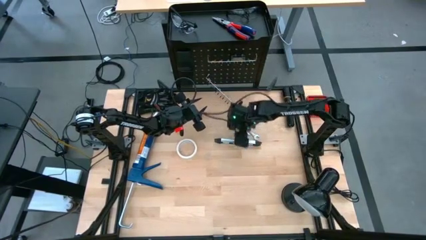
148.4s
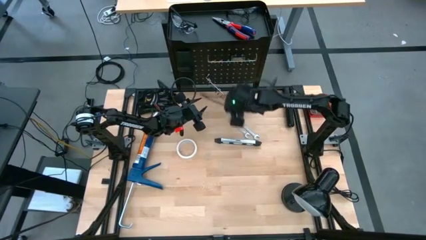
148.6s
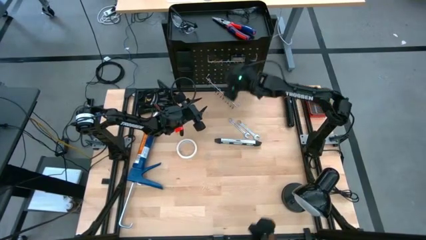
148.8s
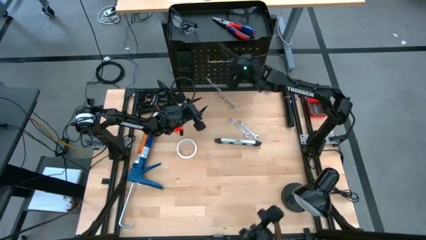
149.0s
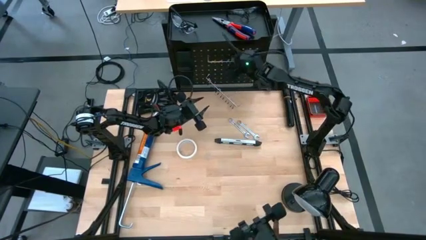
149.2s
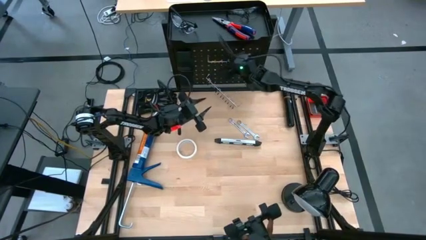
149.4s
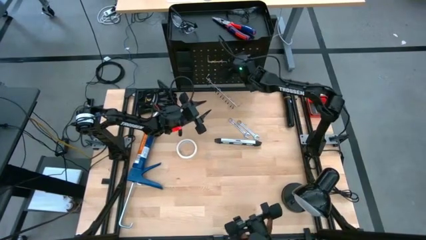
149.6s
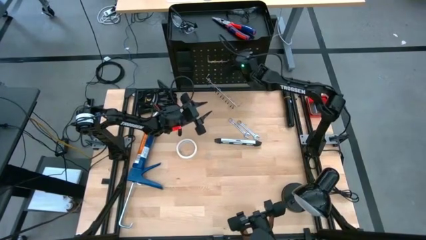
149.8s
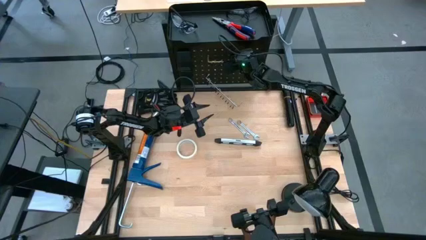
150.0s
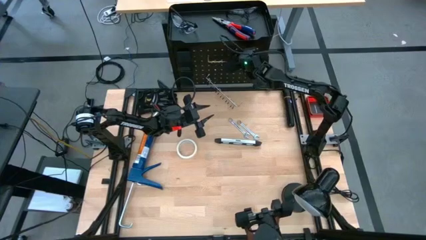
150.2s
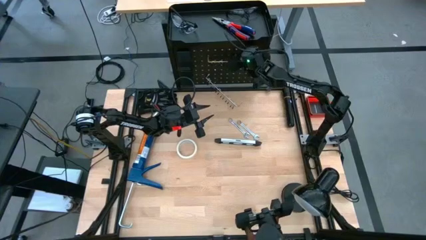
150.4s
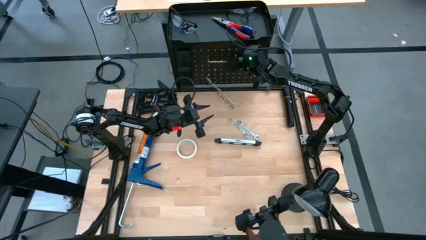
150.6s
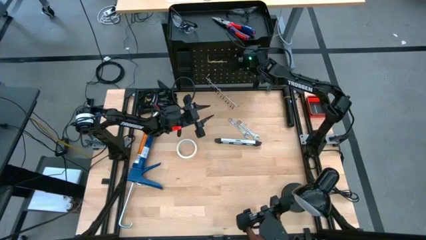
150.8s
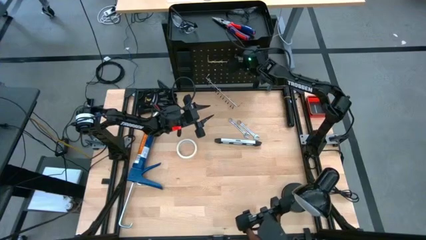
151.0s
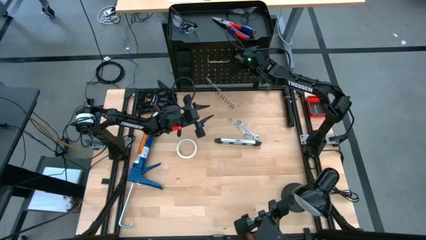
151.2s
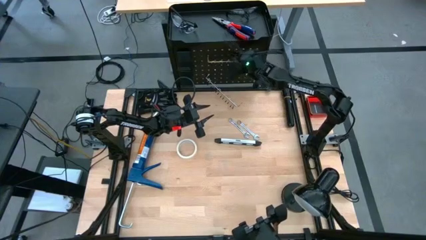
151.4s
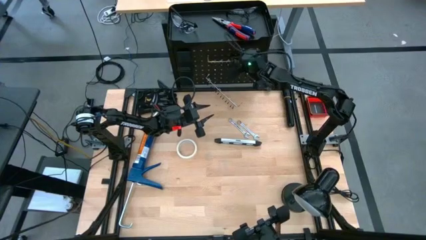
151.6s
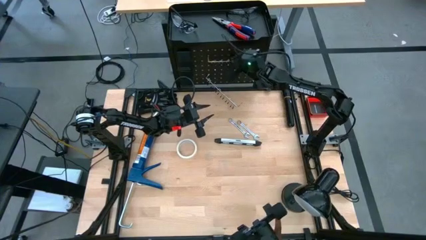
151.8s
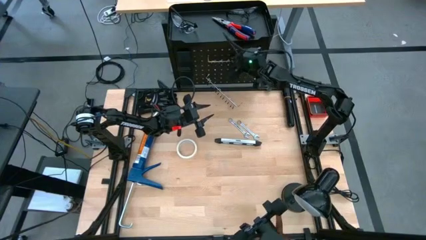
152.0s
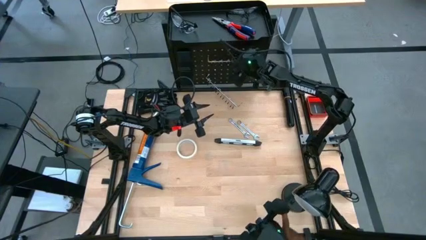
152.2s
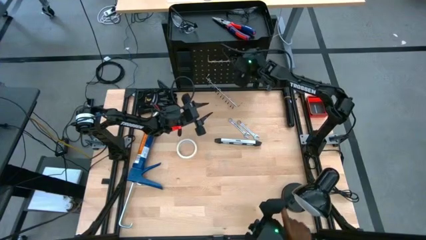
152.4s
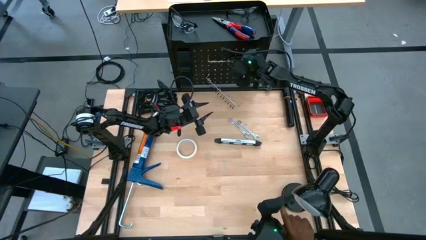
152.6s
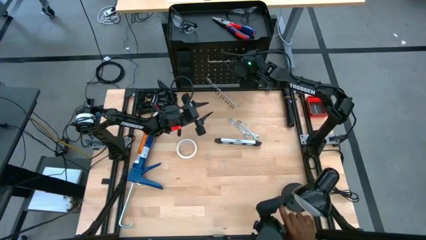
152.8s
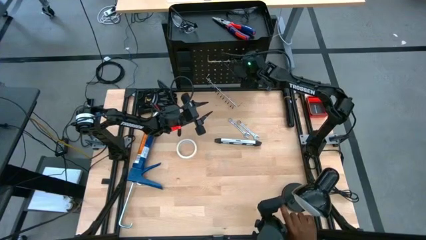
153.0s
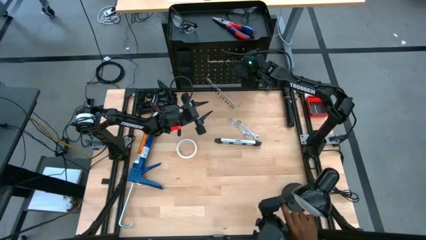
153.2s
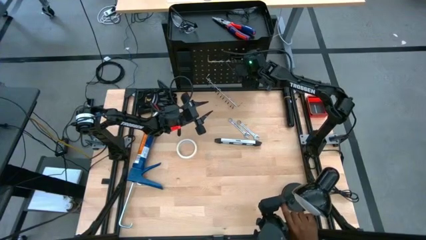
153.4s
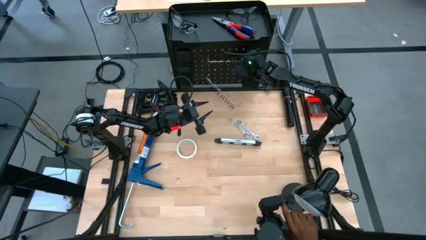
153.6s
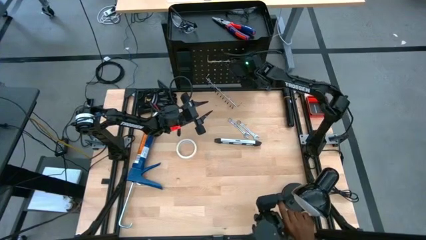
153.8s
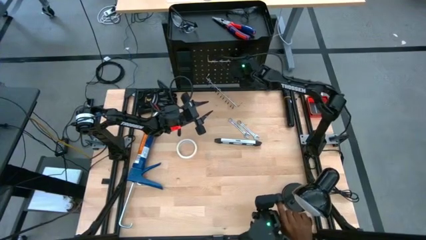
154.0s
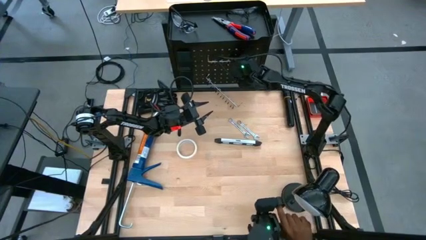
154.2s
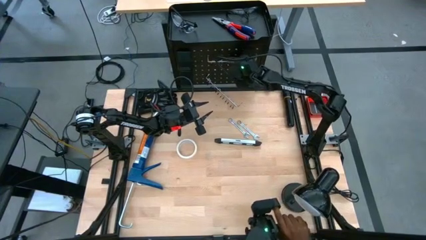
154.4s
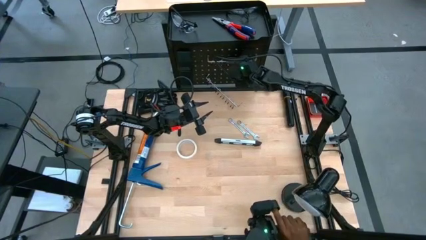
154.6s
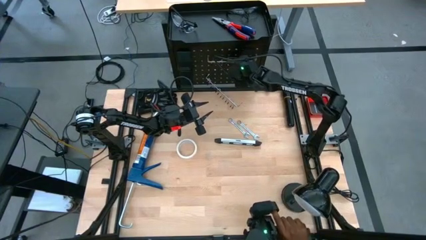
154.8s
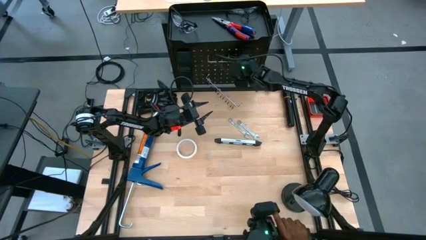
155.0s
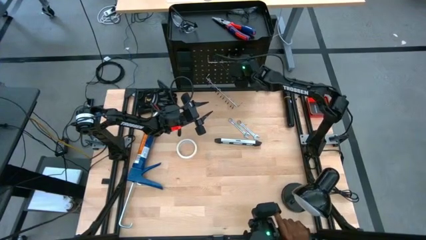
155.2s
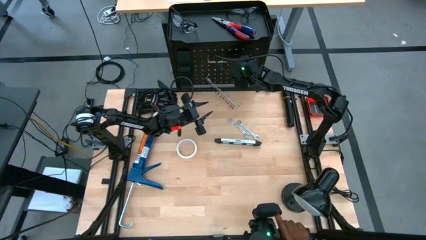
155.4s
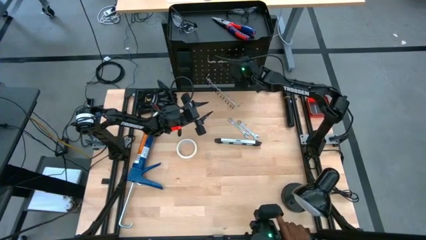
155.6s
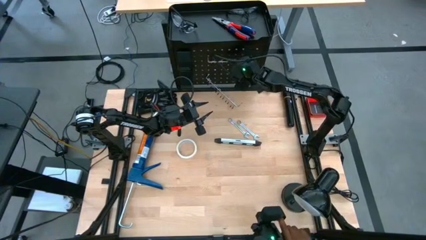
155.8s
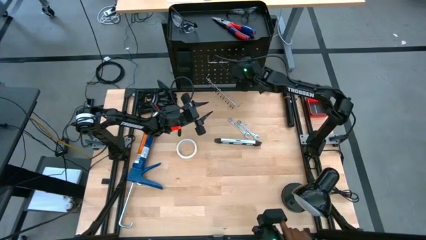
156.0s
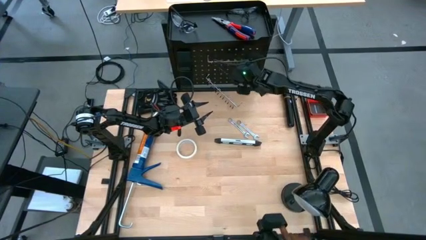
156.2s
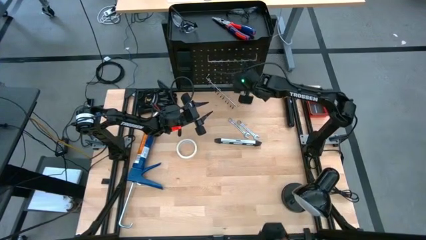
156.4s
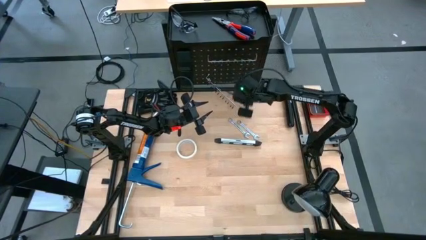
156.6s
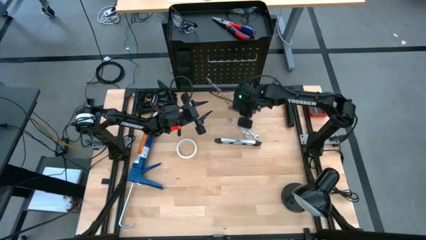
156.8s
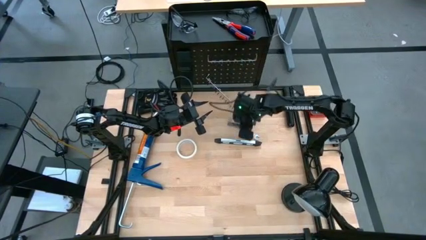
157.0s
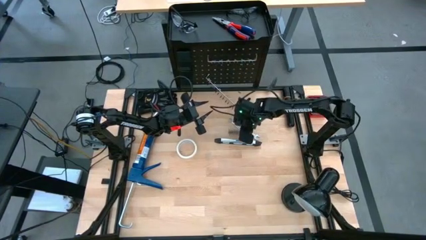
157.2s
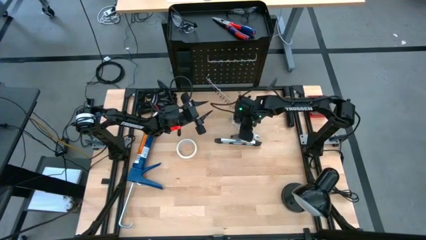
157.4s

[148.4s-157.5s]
Task: Hang tools onto peg board
Unhang the utility knife from the peg board

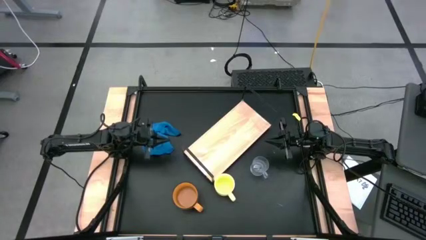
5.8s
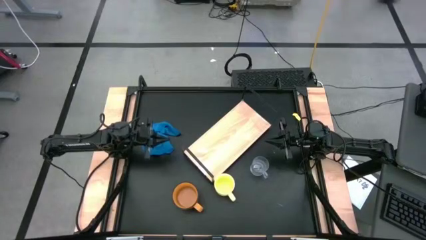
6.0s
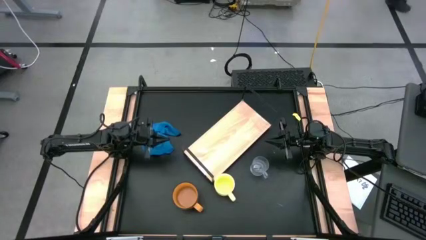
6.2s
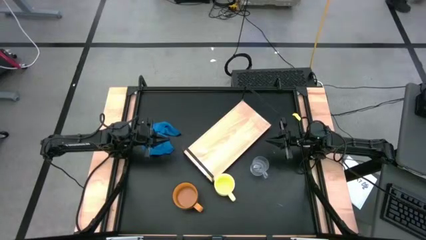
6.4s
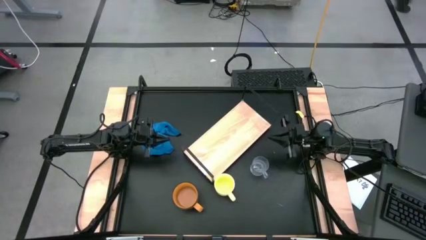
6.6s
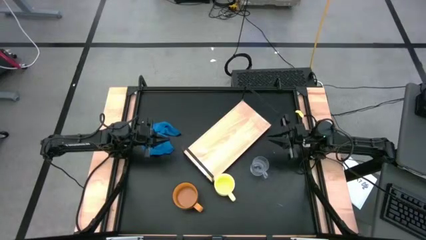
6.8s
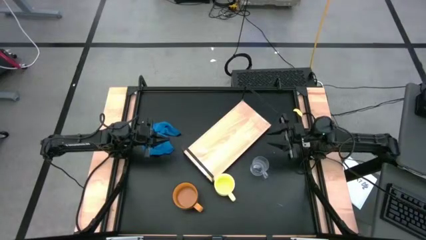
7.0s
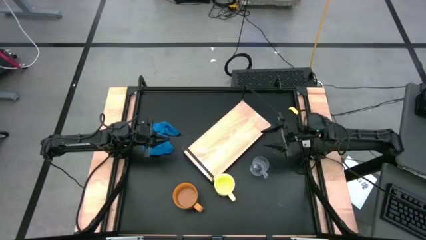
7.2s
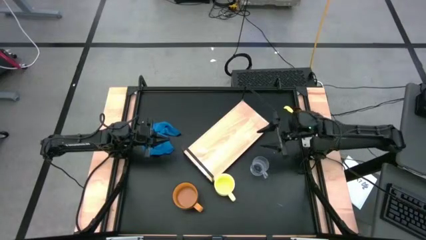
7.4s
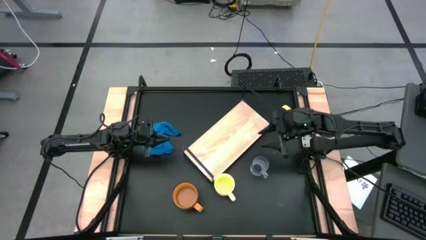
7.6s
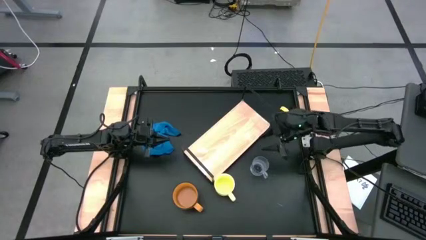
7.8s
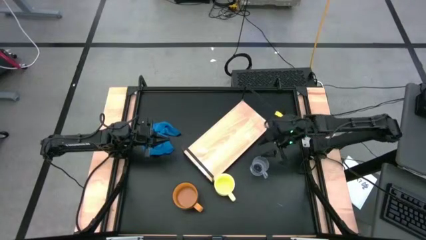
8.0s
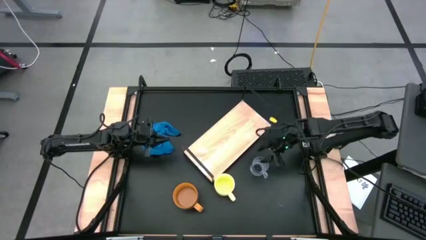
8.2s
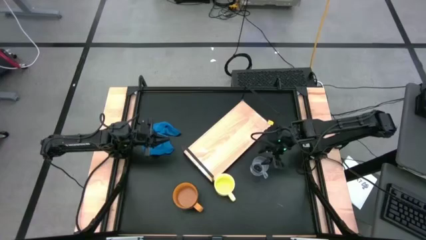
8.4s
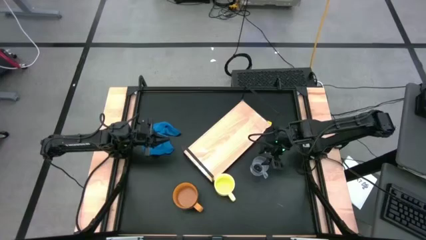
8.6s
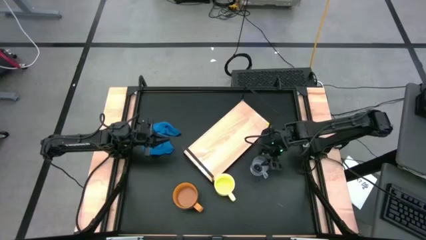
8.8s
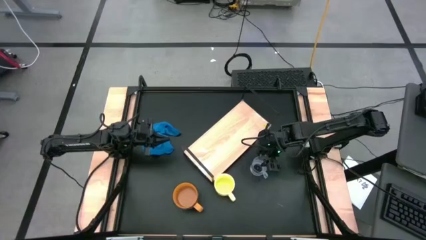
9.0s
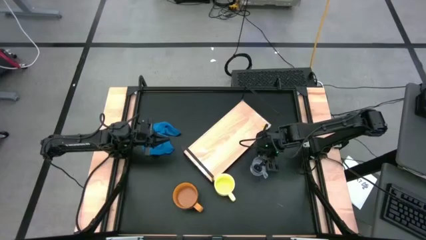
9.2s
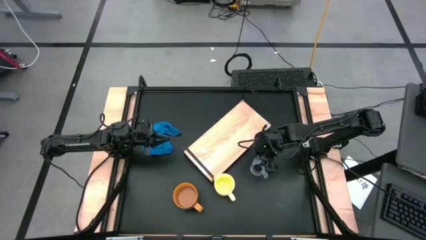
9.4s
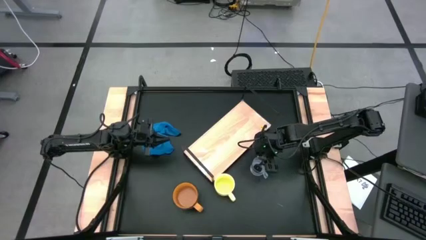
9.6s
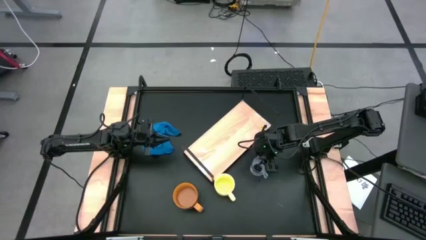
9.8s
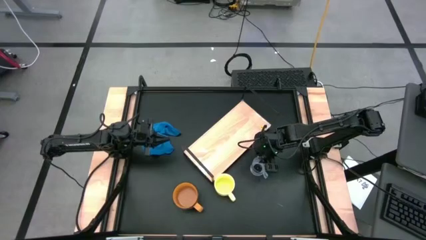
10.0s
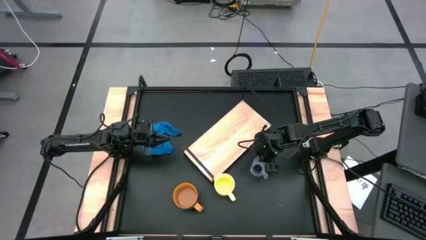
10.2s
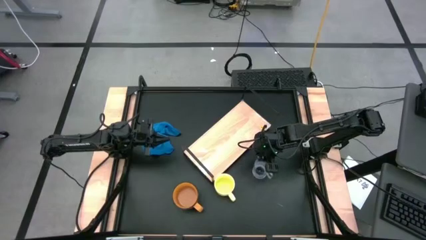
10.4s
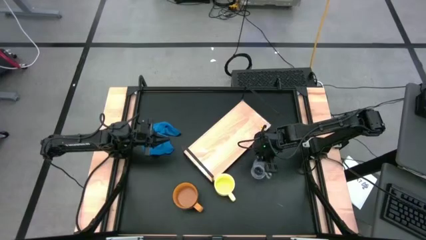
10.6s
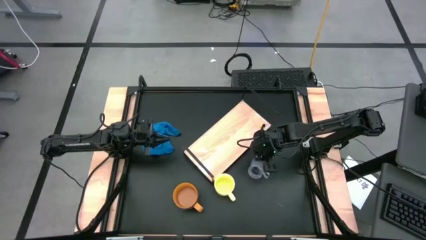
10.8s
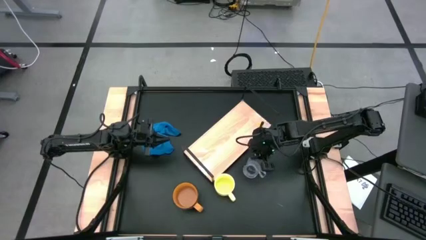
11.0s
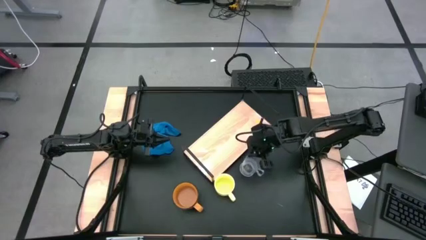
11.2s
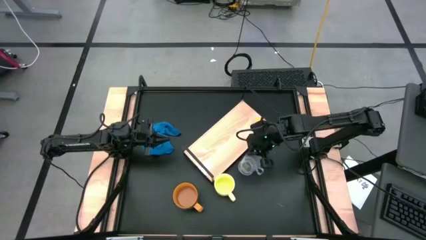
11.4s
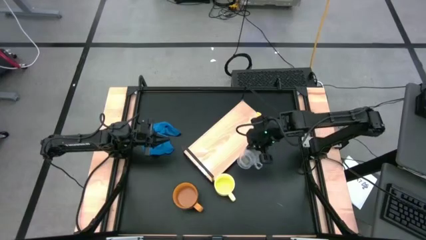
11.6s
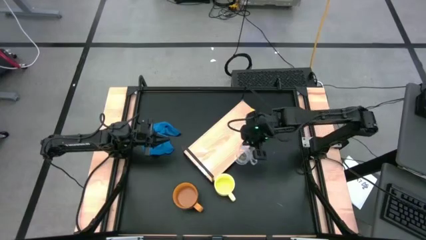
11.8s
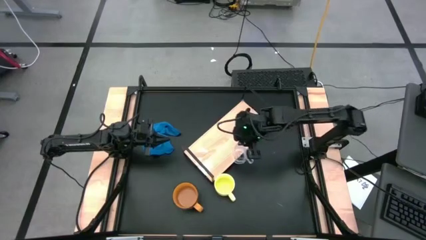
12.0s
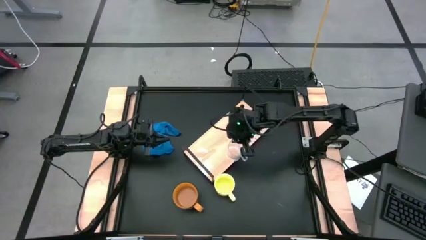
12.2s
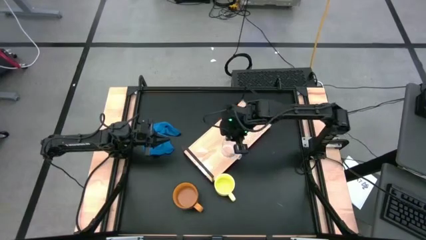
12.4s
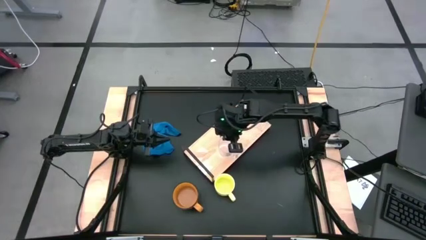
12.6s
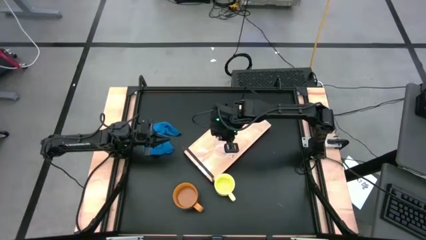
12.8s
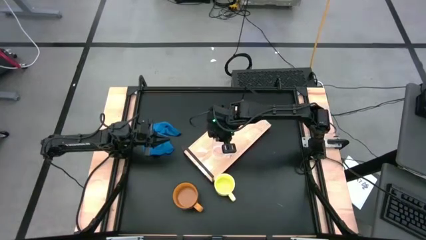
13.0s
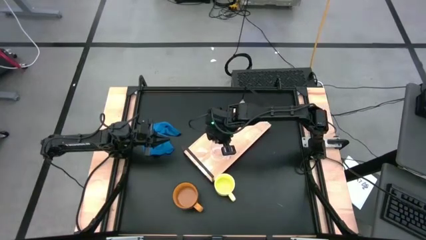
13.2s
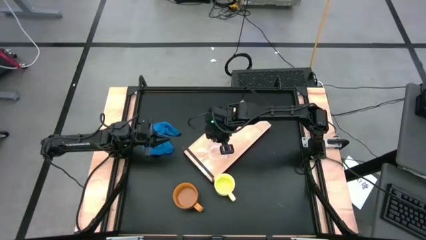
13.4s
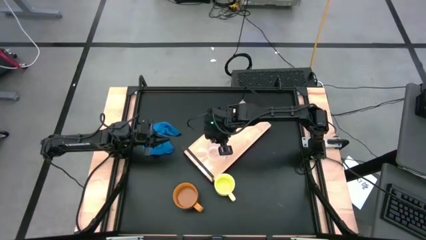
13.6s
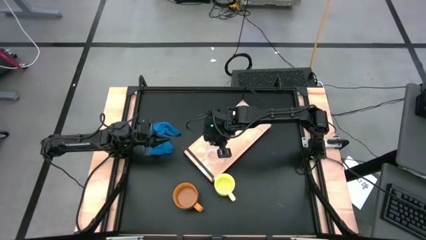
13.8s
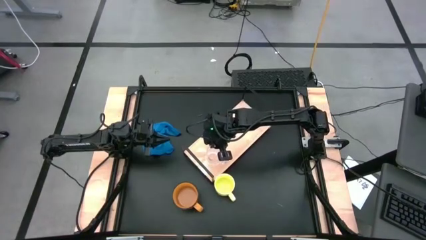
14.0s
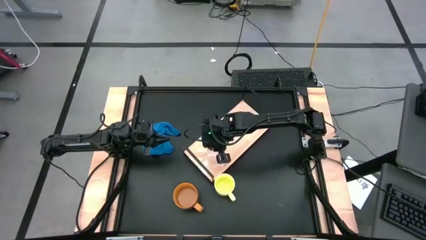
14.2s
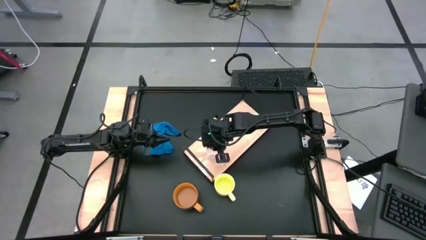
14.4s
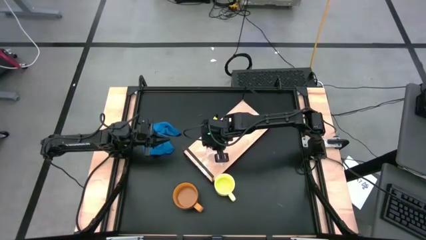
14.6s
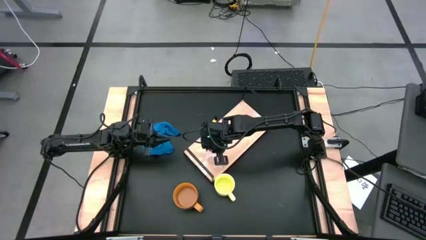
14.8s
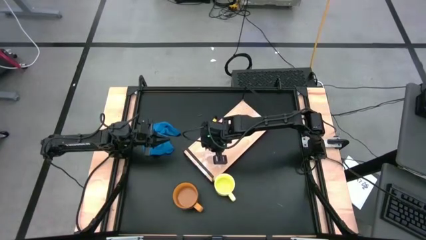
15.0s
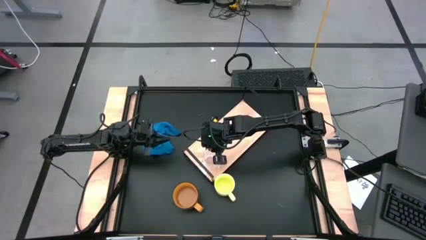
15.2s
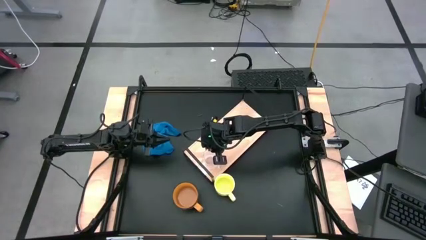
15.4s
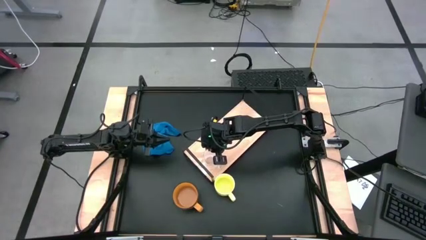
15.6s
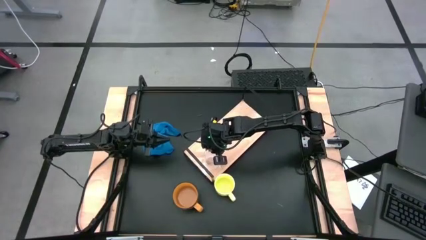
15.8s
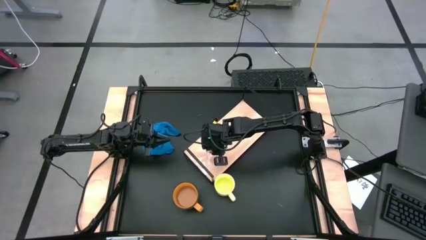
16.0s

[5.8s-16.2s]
Task: Stack small to large cups/mugs on shelf
Put the transparent mug on the shelf
